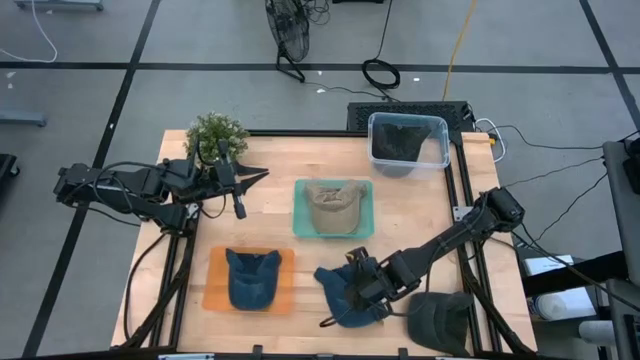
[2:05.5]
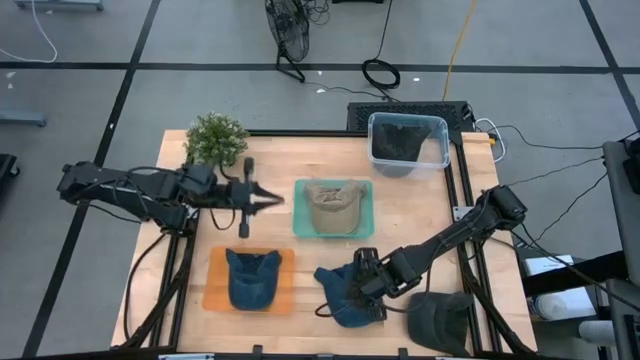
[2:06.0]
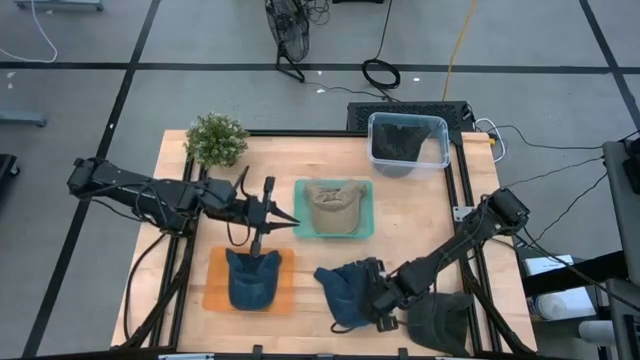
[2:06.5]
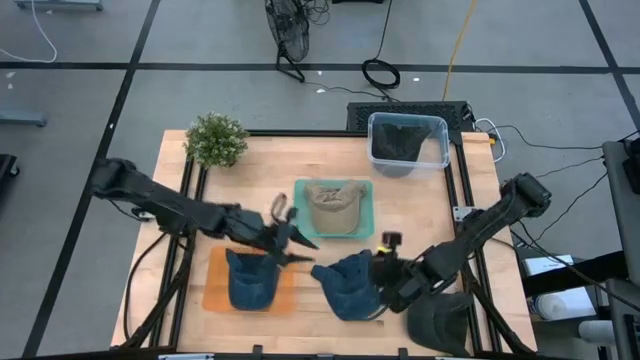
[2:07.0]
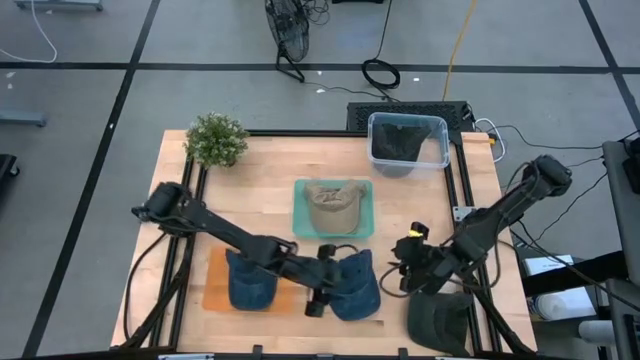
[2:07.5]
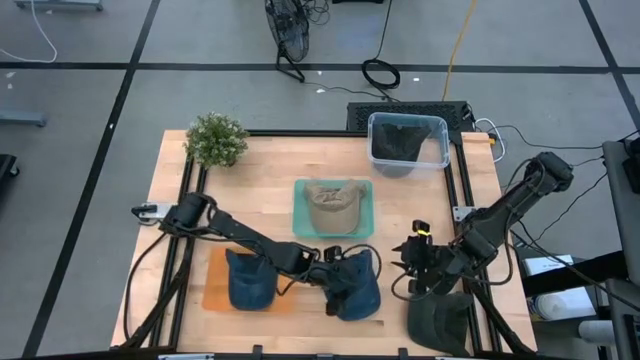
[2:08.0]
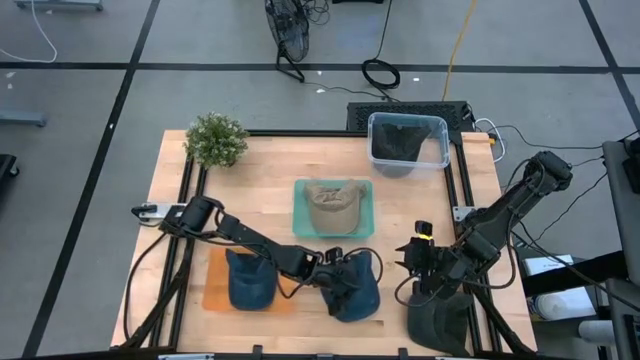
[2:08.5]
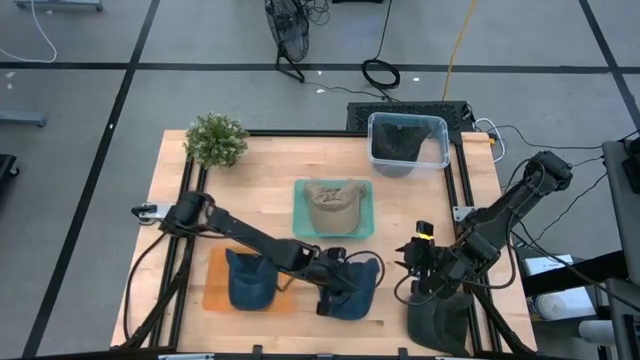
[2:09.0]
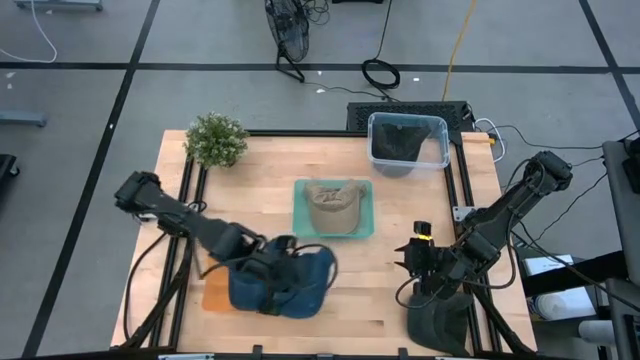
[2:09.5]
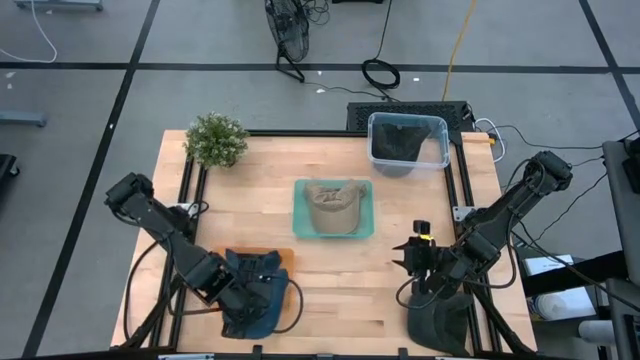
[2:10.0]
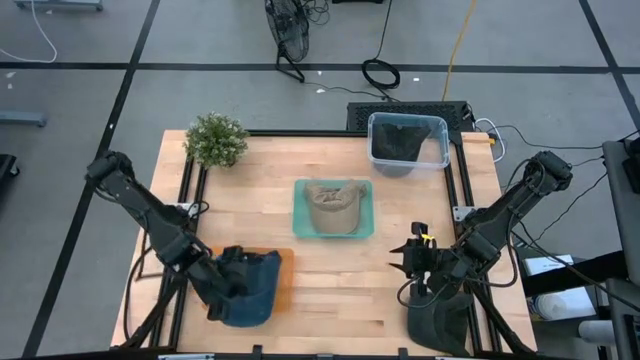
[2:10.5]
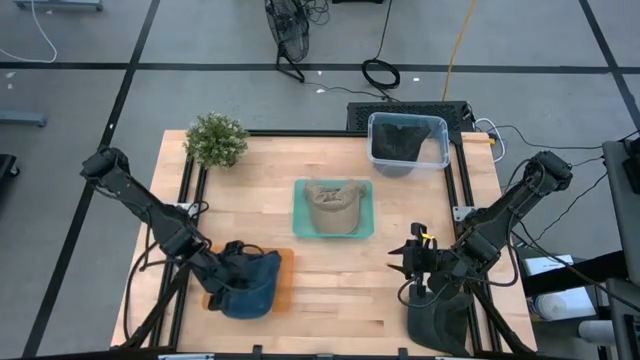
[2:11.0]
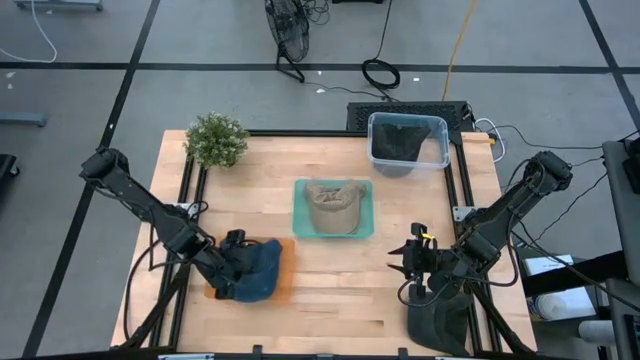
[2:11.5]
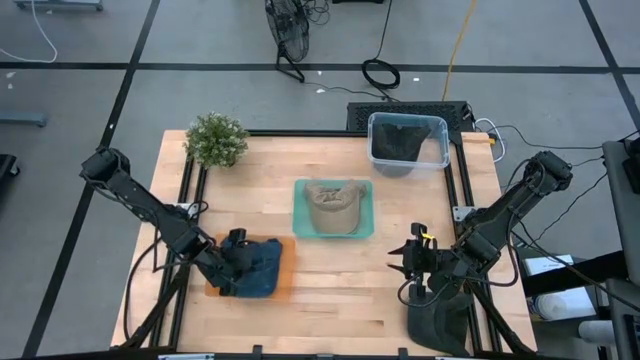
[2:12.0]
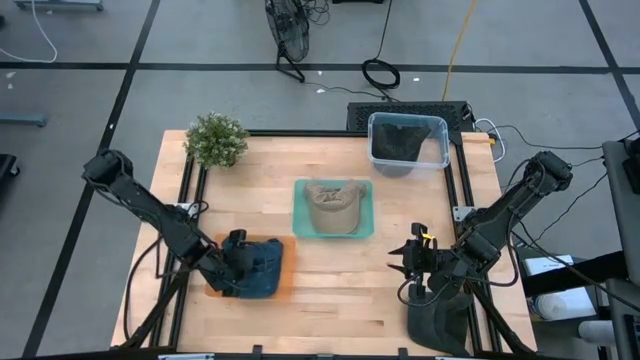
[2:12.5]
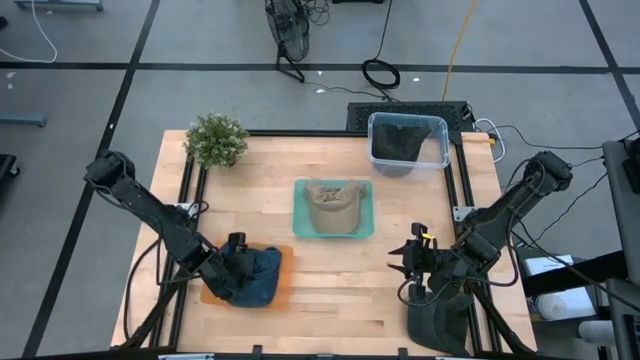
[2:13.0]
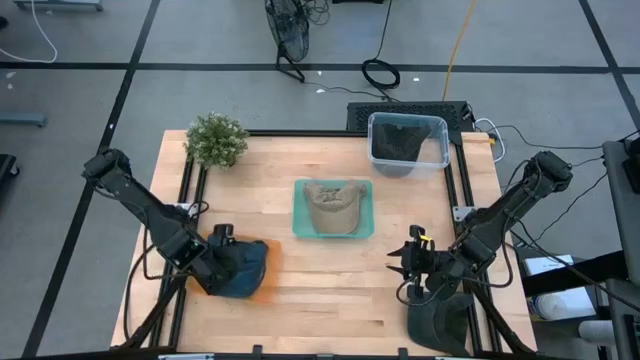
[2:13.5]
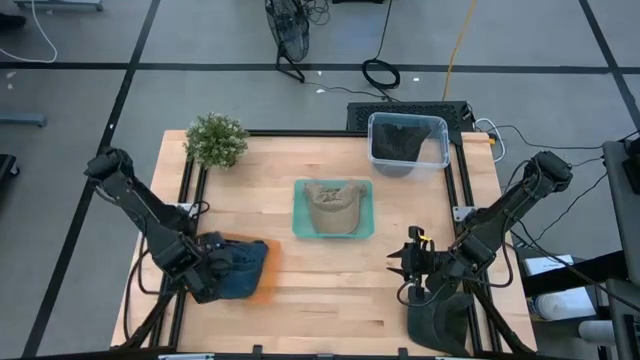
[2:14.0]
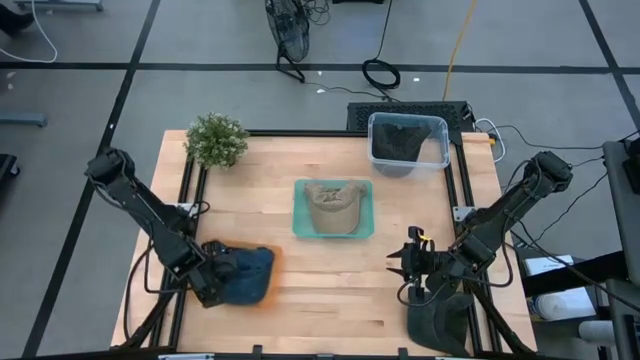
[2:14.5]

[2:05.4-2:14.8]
Task: Pick & Place hat
Put the blue cap into the orange bin

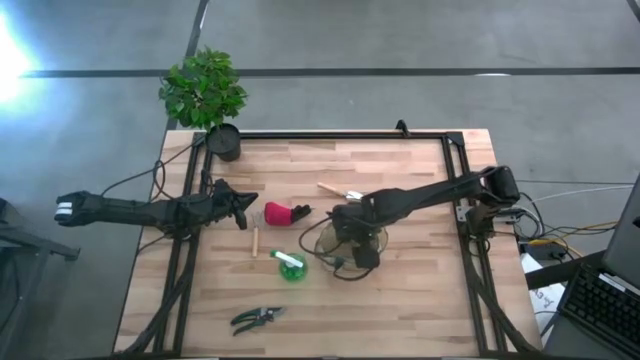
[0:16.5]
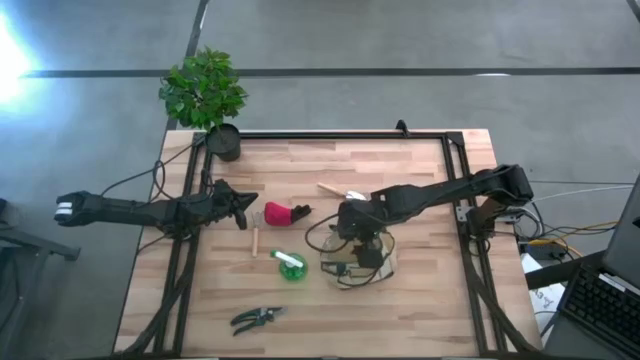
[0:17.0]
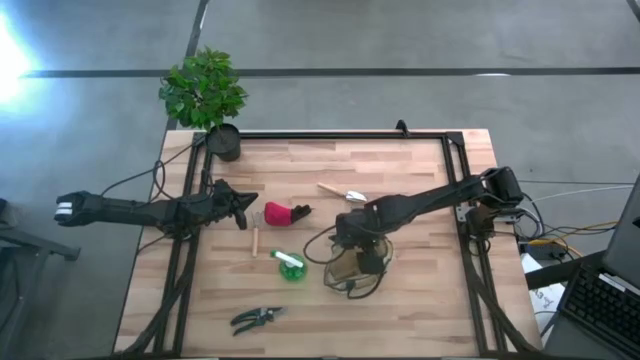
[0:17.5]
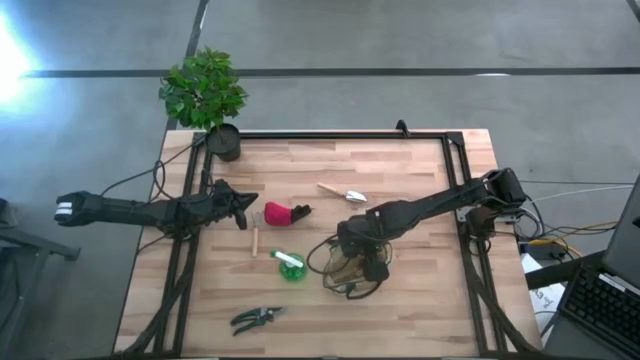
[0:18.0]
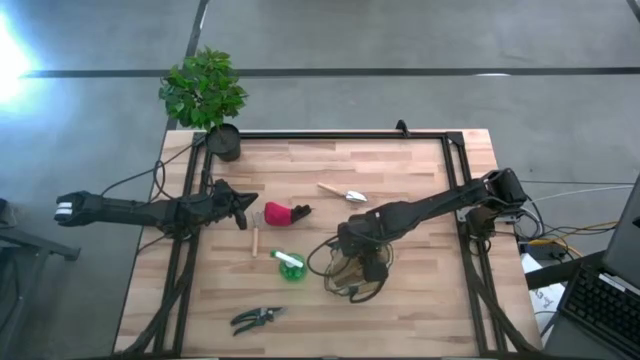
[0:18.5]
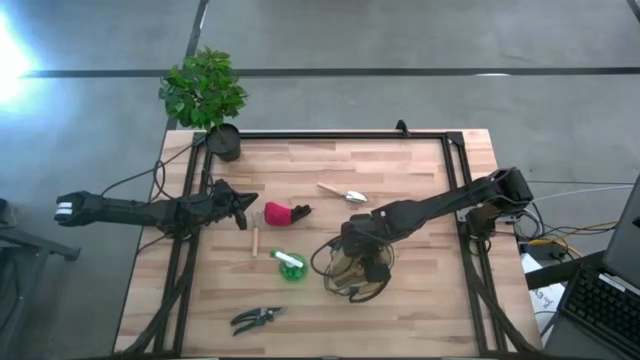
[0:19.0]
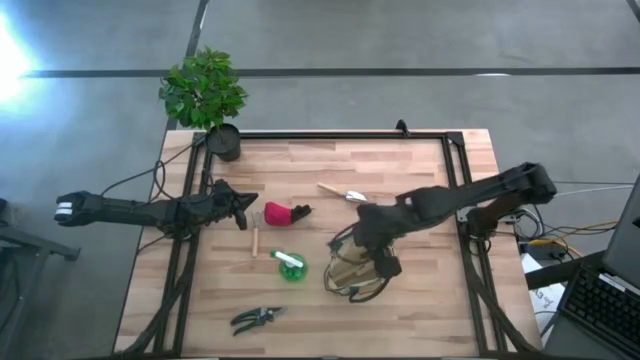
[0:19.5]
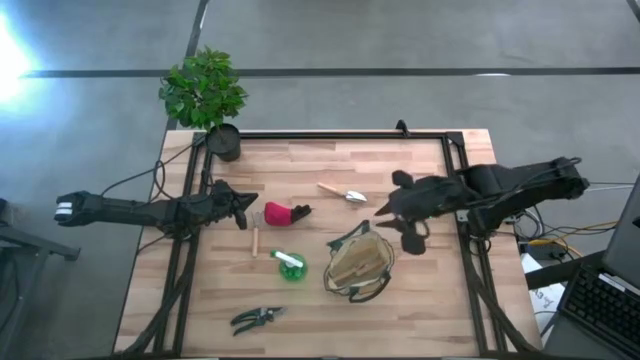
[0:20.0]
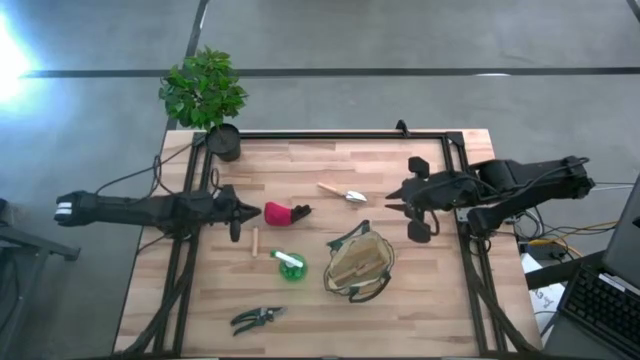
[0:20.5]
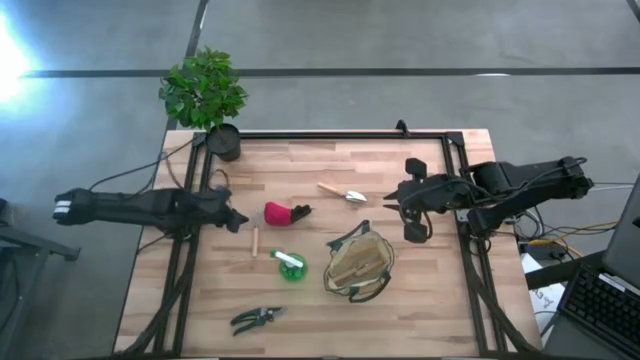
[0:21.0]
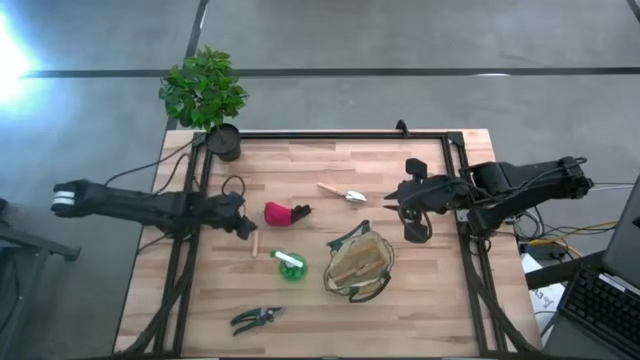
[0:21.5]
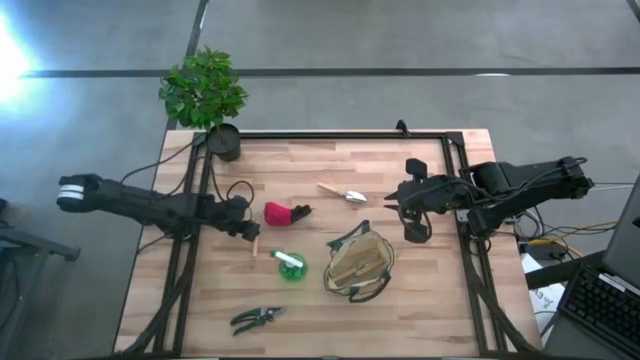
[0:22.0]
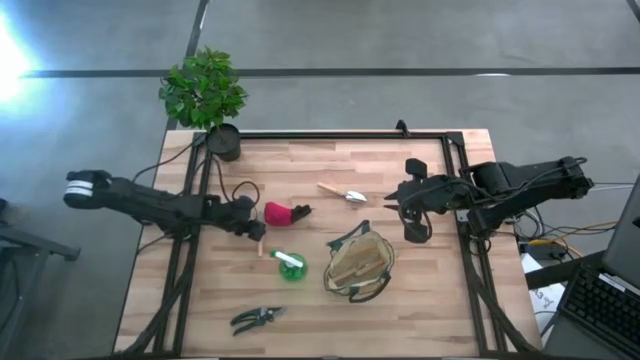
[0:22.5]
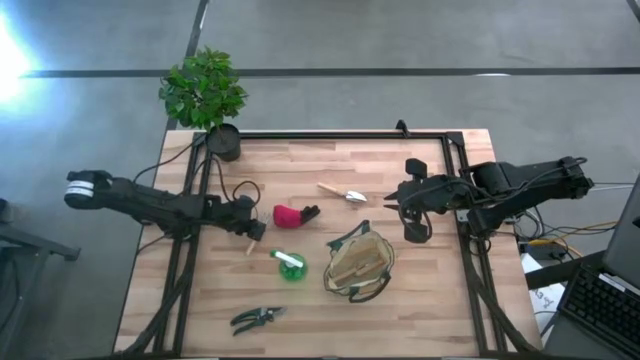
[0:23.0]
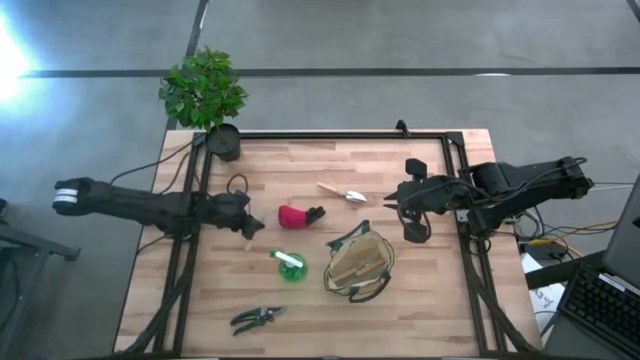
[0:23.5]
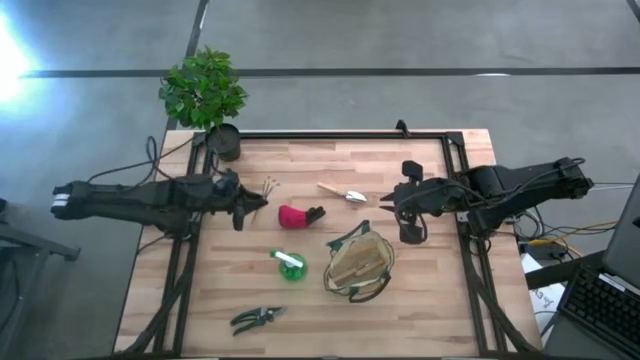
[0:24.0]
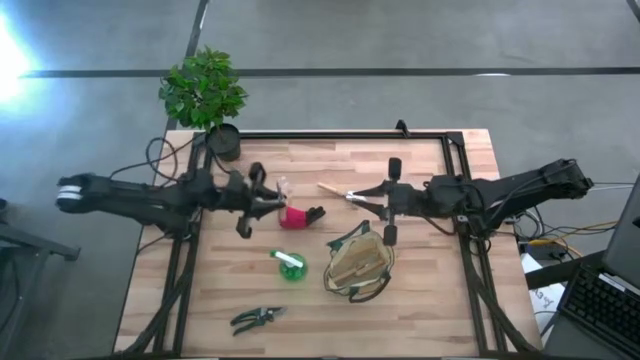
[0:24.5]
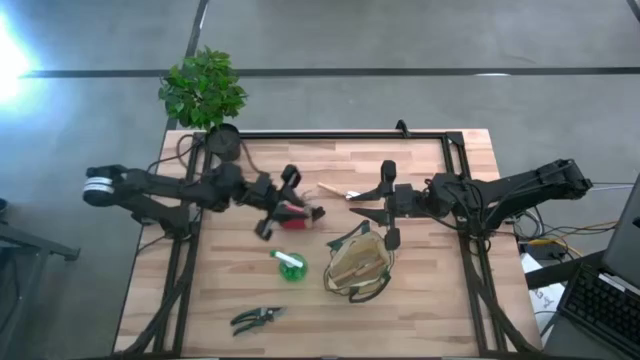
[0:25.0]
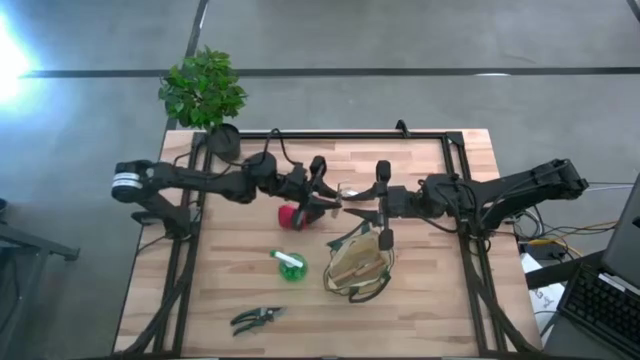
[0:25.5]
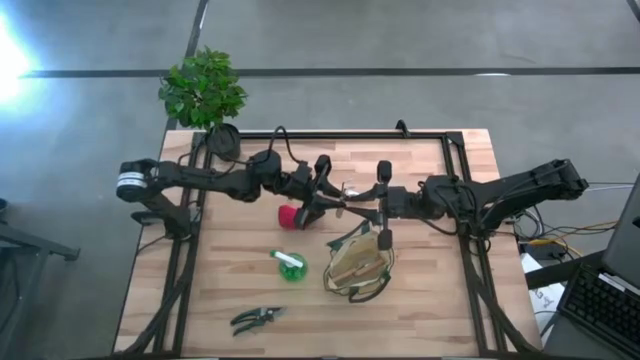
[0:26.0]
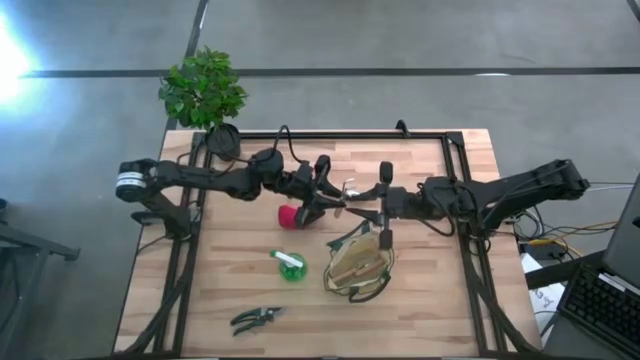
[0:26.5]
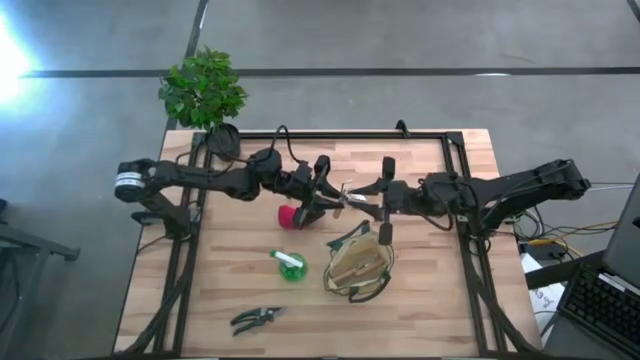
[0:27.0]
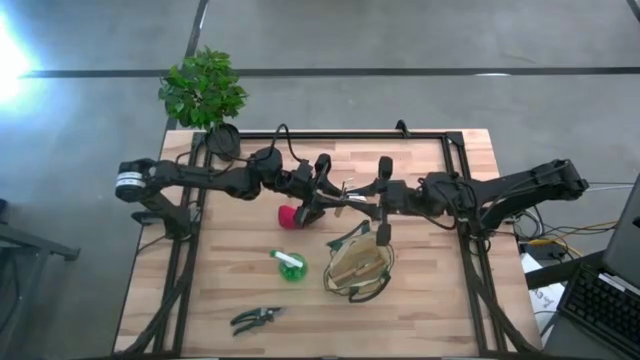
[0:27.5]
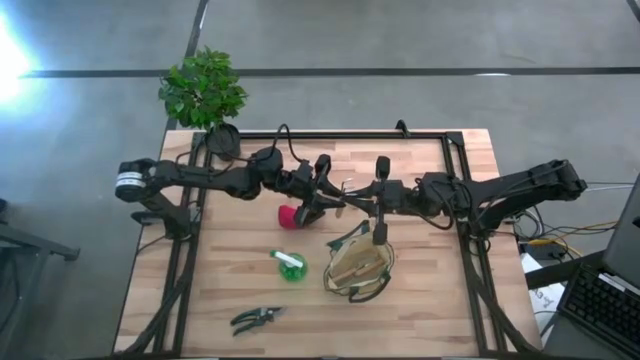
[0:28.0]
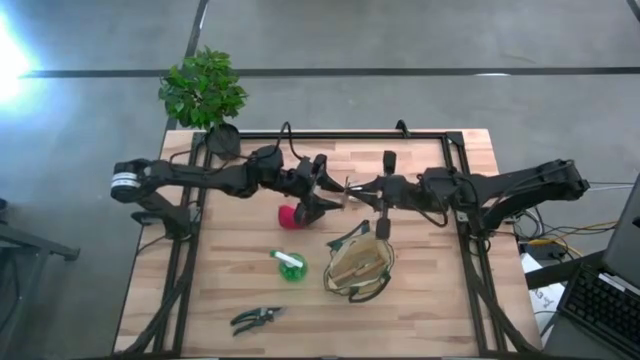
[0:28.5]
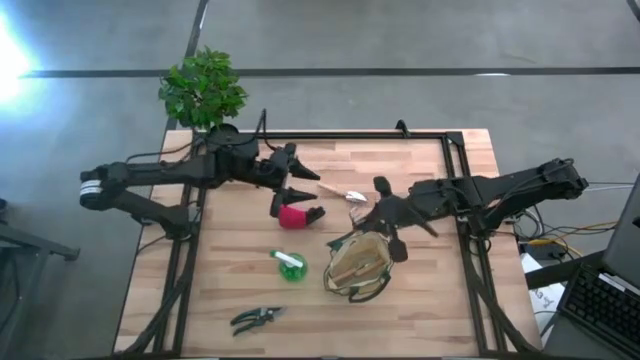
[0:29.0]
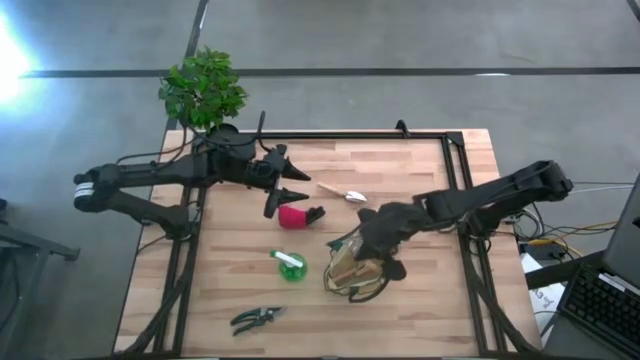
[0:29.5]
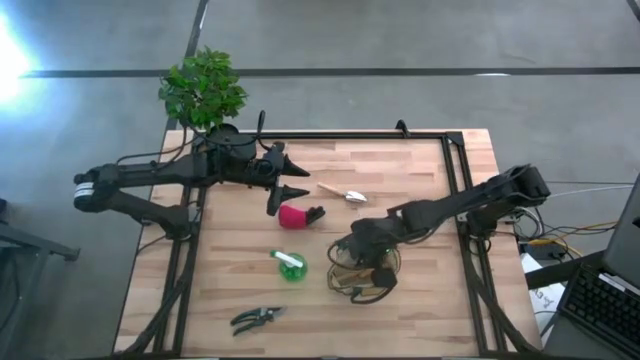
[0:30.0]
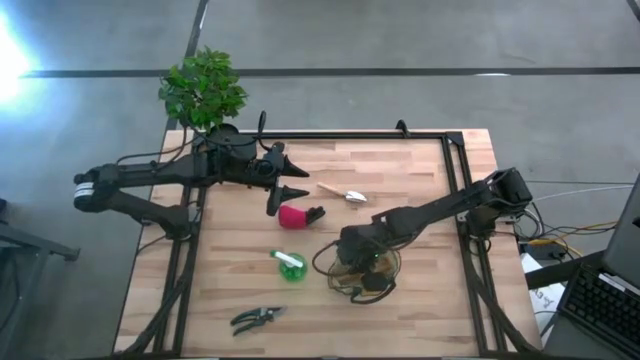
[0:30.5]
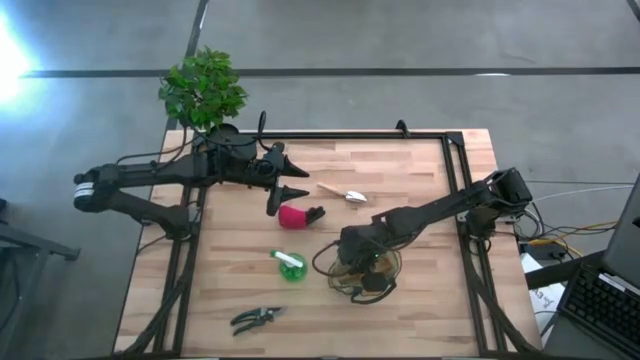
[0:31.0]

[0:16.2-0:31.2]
Task: Pick & Place Garden tools in Gardening bag
Put the brown hand rake into the gardening bag
